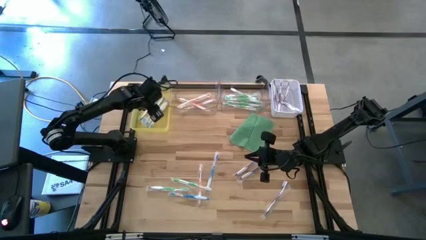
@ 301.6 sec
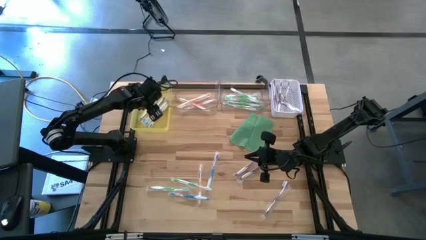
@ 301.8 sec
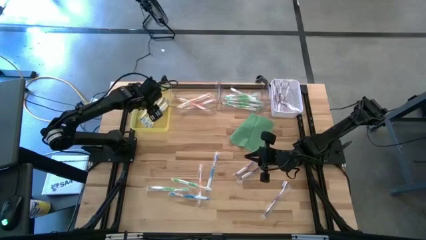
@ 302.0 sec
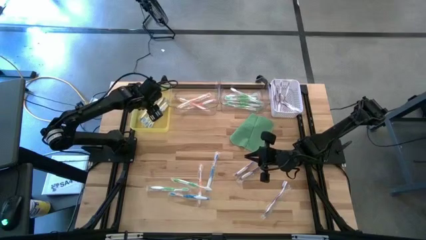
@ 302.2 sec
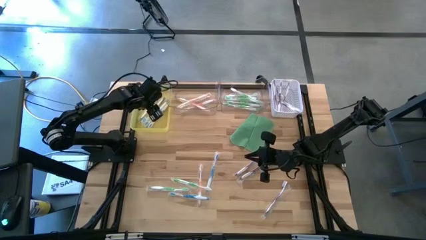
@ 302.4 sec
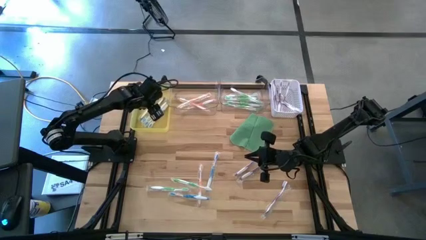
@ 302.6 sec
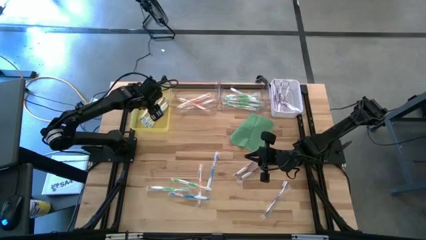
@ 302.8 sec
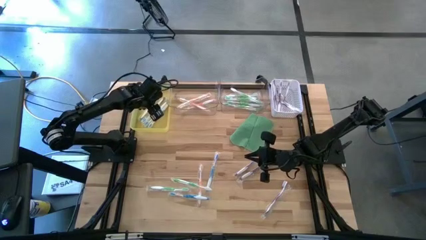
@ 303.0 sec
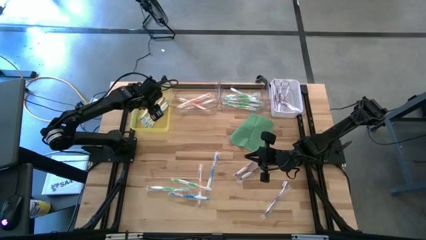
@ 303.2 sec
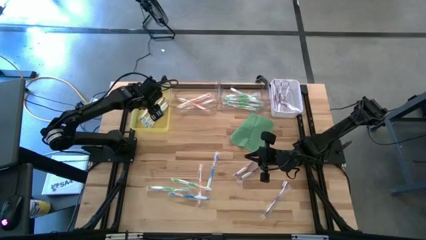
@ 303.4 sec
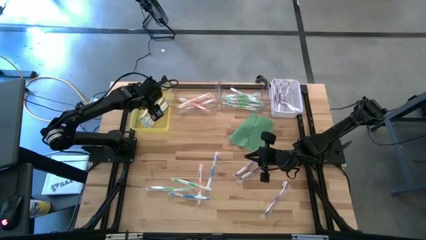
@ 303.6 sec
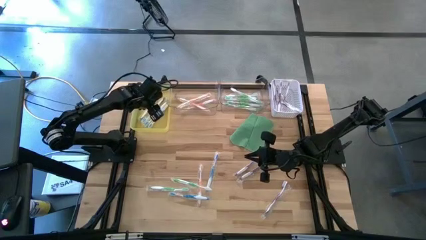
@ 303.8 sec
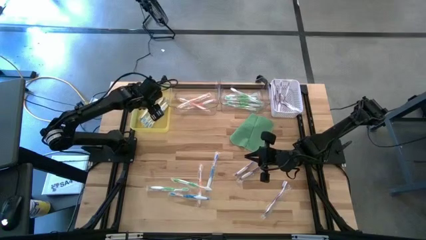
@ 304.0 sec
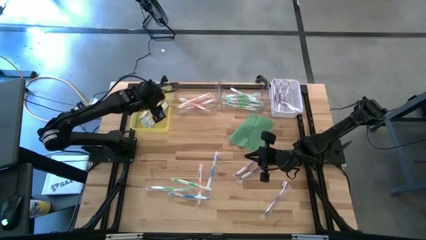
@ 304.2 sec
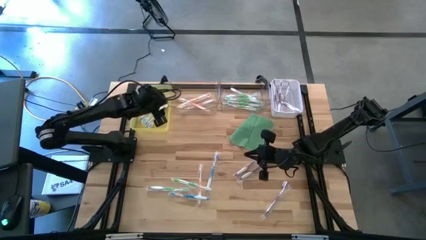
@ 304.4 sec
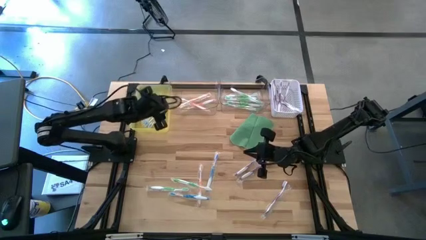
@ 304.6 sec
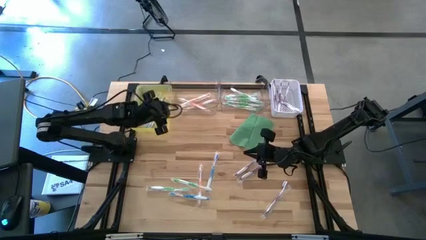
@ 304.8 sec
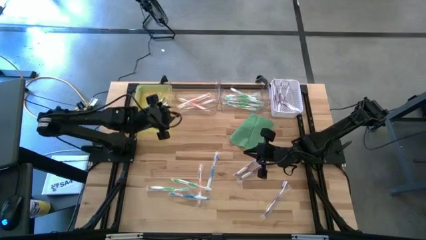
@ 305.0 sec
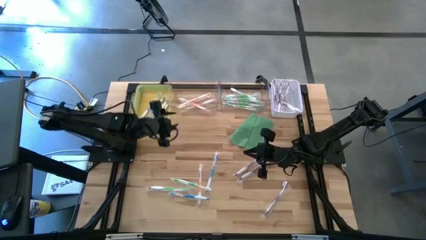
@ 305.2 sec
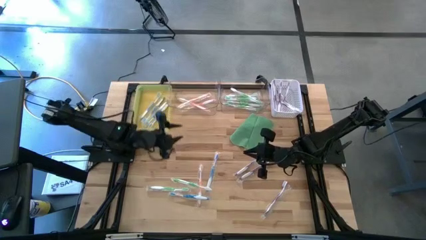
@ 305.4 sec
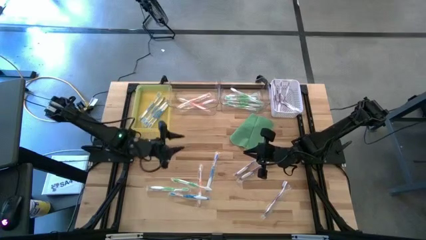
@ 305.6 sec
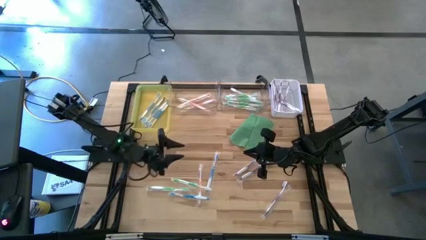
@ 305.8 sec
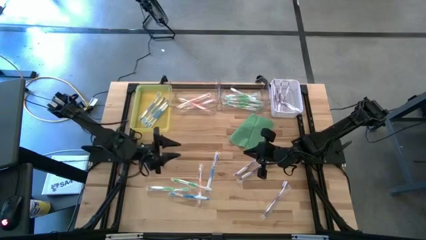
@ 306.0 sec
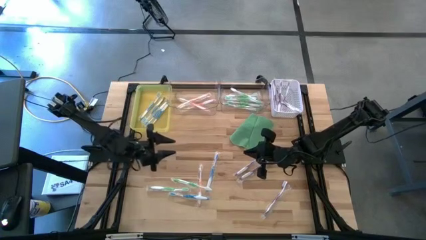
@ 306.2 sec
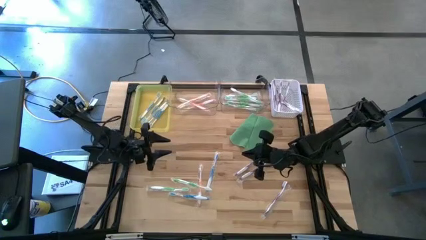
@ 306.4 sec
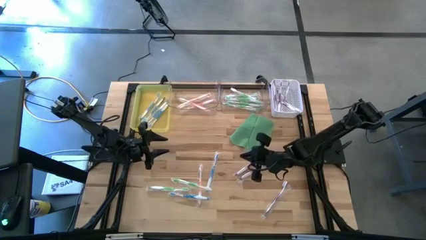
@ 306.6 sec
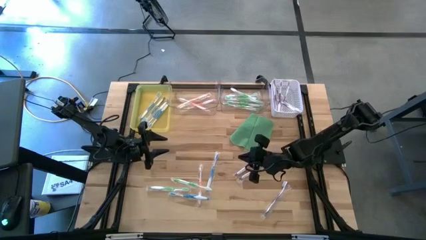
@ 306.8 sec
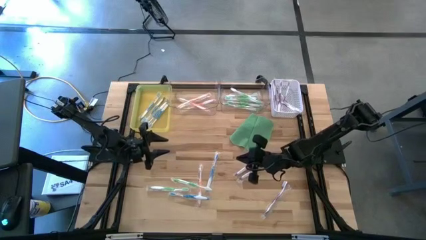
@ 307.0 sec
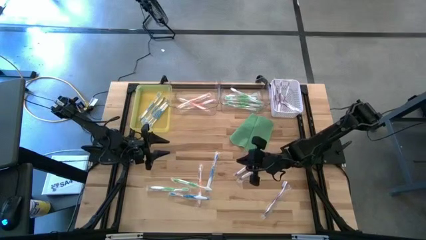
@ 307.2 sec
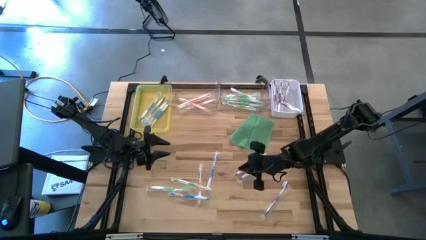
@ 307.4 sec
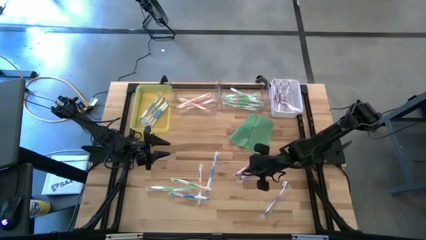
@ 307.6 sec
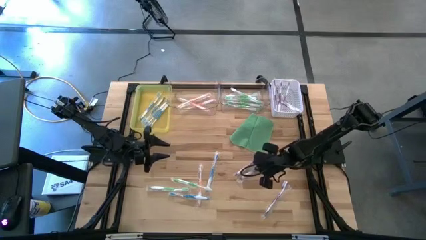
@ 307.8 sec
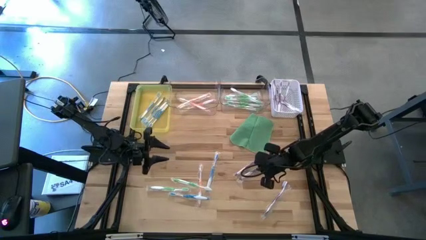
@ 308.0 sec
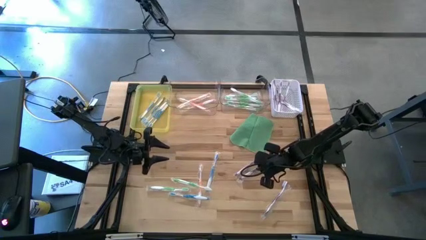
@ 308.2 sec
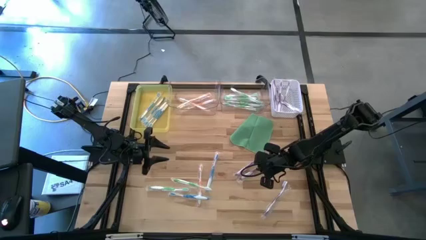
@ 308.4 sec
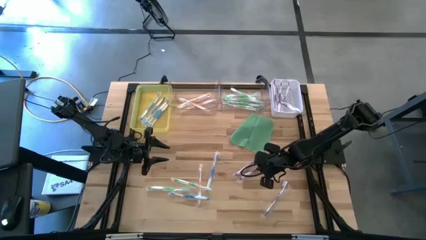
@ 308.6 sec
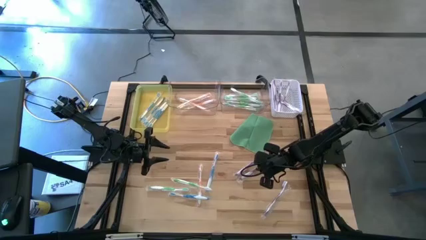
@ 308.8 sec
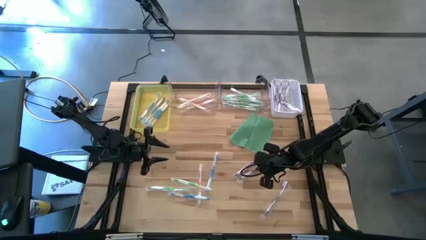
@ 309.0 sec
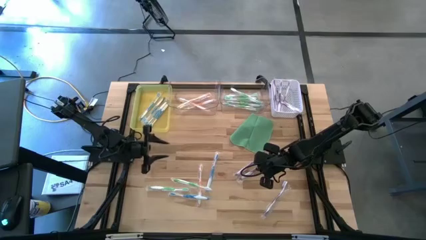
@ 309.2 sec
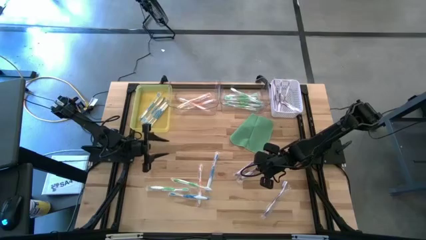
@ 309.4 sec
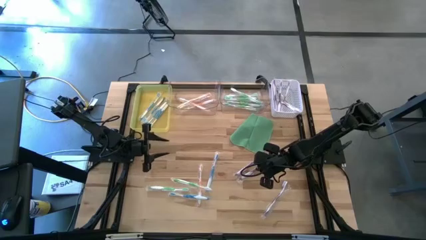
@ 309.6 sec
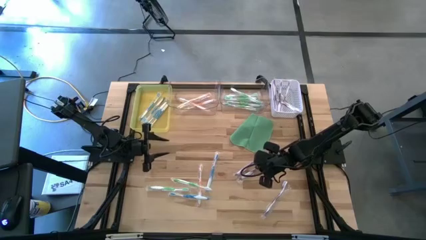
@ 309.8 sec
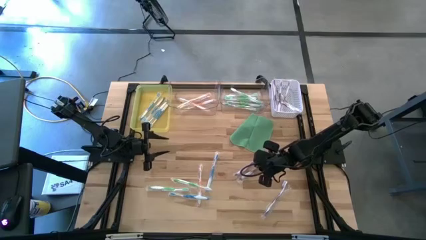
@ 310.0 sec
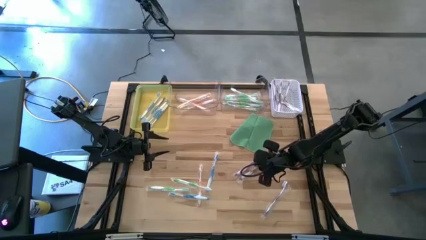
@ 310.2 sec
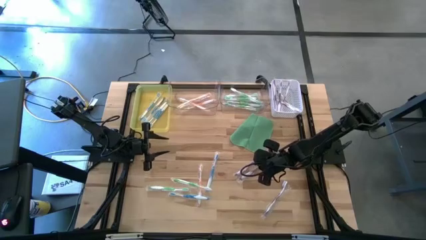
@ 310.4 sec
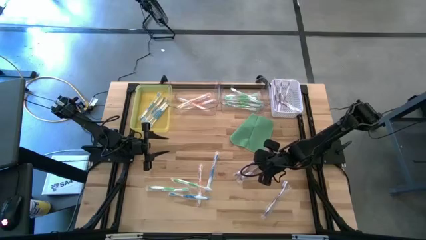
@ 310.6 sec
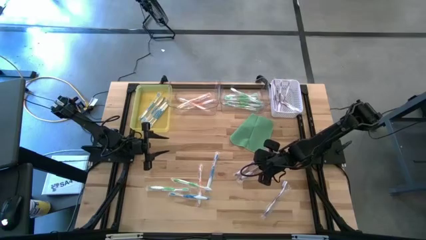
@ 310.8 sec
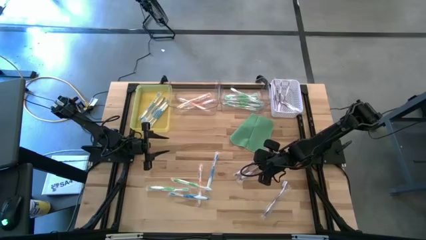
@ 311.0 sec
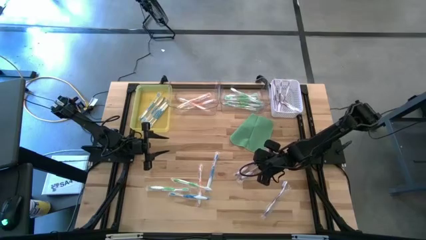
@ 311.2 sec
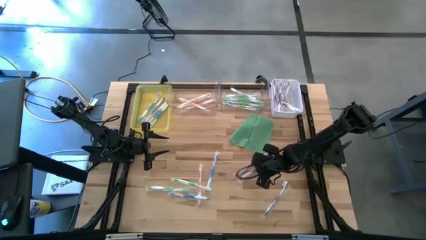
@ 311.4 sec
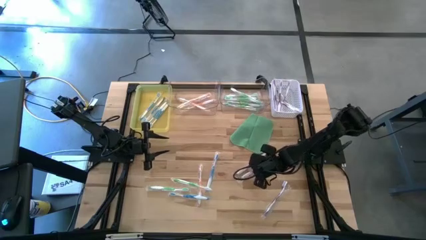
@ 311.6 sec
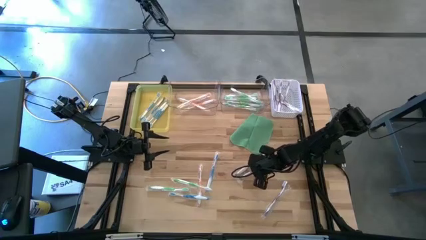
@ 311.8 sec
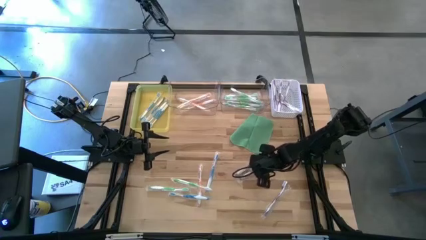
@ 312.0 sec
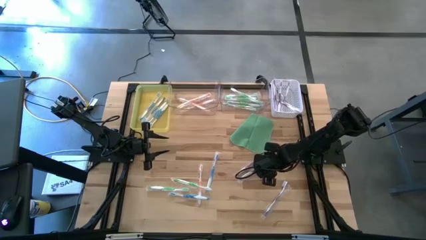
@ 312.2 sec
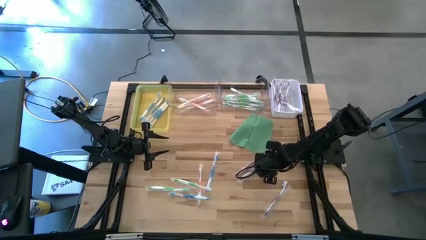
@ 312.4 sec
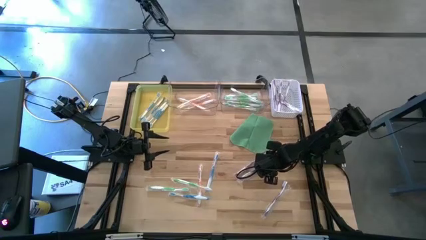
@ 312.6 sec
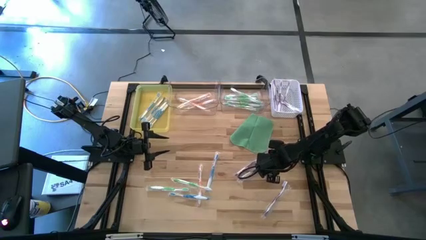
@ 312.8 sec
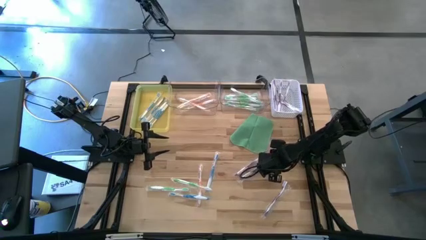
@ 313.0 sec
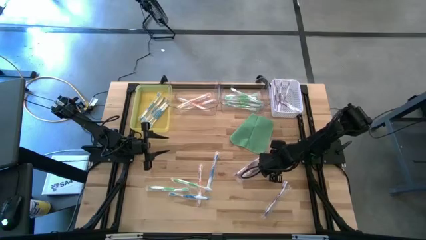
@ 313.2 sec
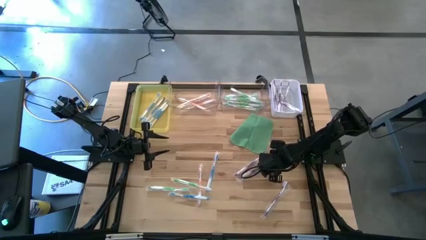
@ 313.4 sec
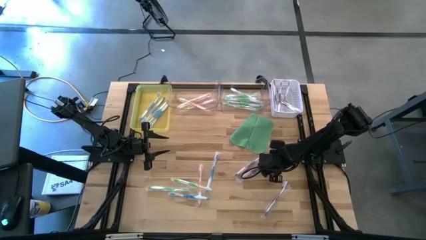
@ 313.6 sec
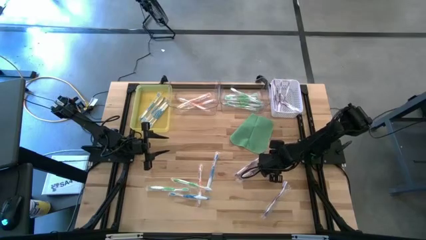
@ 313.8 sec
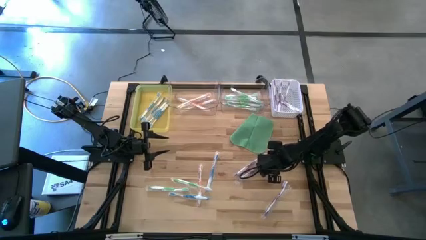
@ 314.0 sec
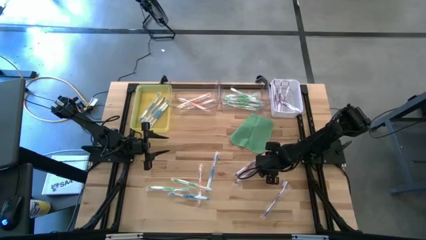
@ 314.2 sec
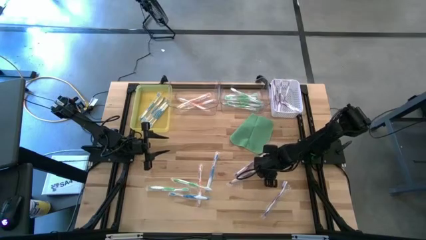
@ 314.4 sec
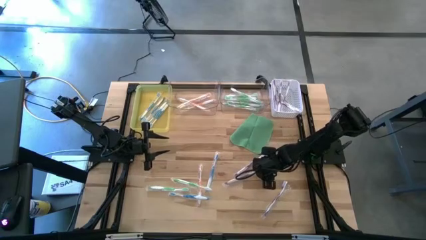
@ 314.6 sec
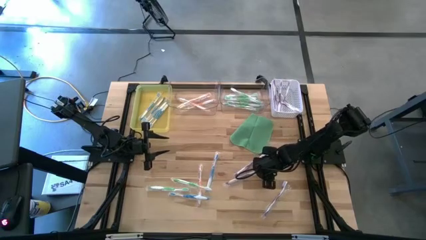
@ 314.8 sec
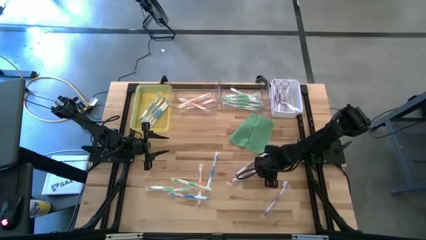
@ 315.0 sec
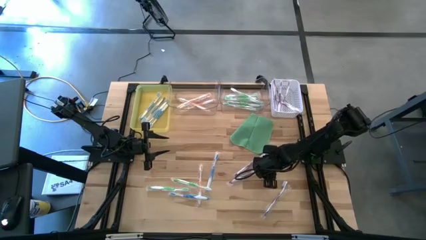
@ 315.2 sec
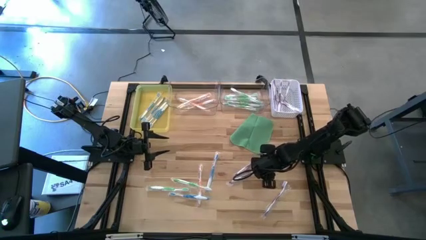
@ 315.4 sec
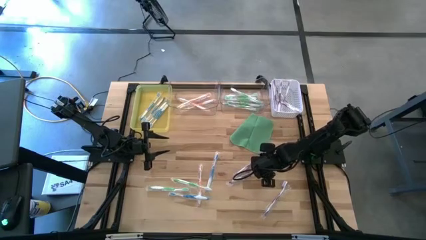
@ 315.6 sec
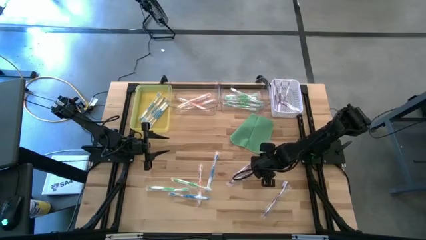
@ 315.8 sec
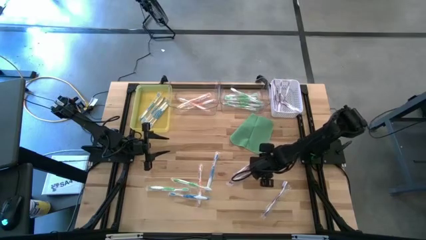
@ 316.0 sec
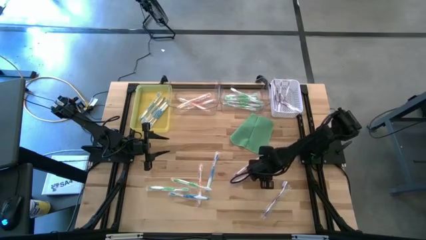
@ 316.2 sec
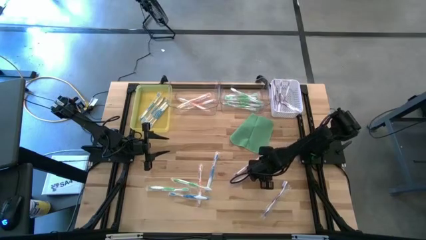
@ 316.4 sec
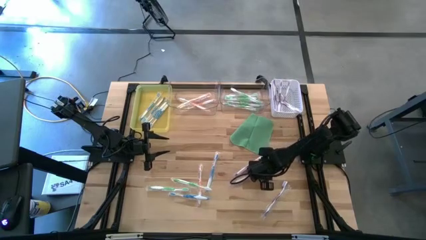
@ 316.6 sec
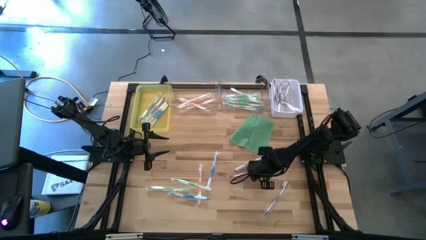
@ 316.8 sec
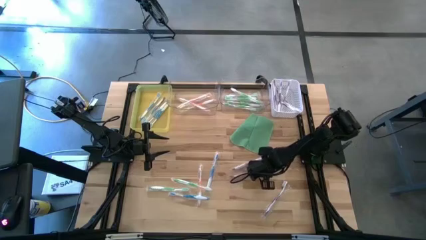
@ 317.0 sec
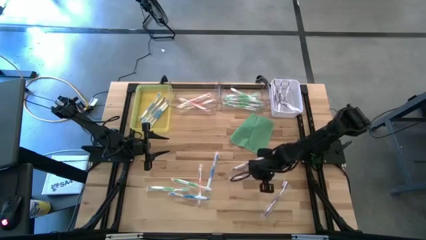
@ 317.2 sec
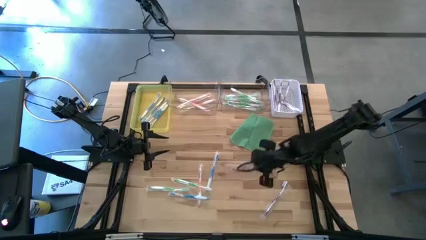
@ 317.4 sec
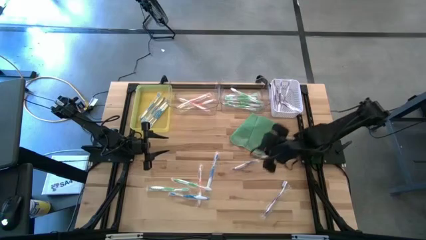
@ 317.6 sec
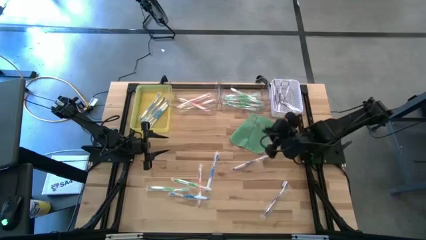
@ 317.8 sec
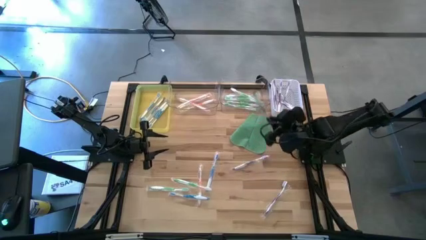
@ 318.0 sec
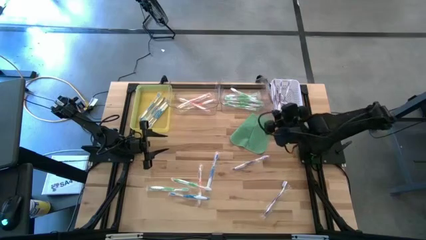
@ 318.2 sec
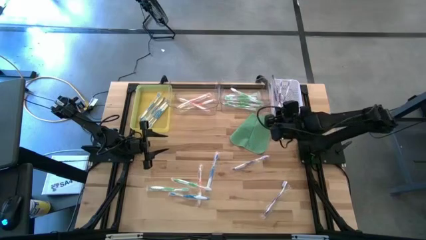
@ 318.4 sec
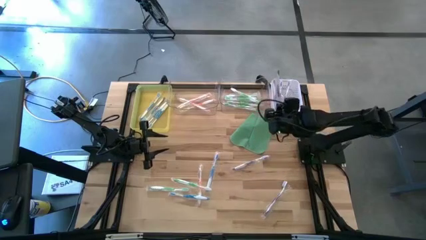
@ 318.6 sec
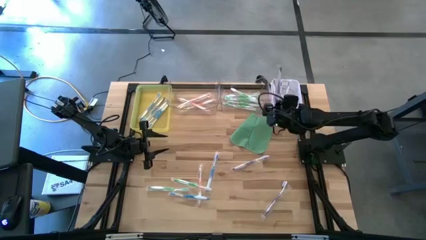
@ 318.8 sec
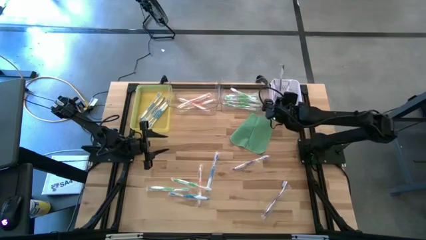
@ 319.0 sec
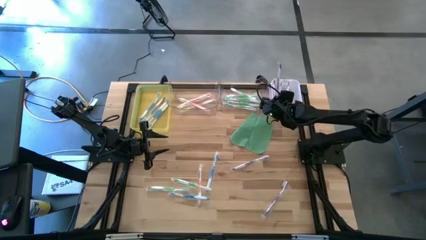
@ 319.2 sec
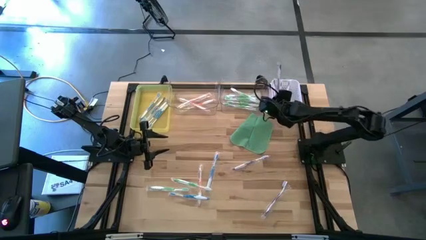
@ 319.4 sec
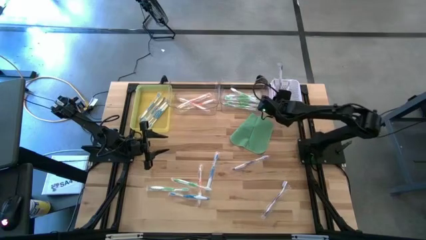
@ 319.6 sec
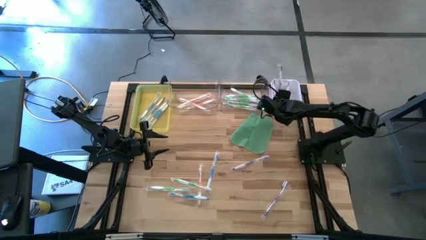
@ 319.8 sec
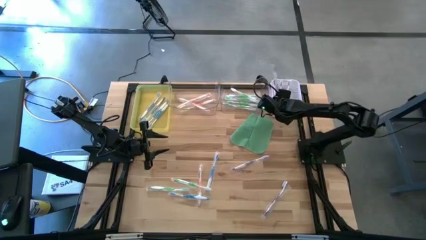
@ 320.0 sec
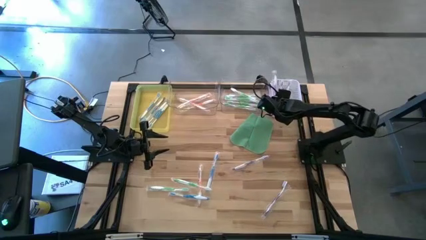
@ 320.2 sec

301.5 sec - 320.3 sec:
Task: Pick & Place Toothbrushes
Put the purple toothbrush into the white bin
